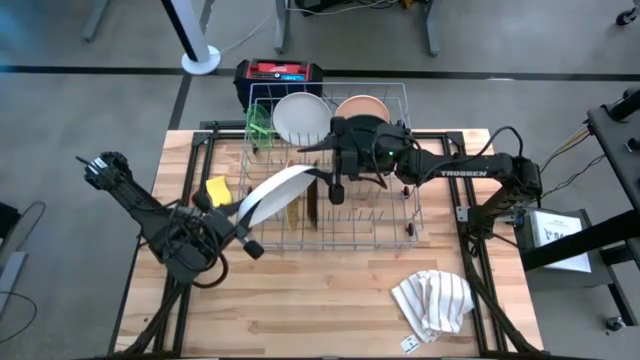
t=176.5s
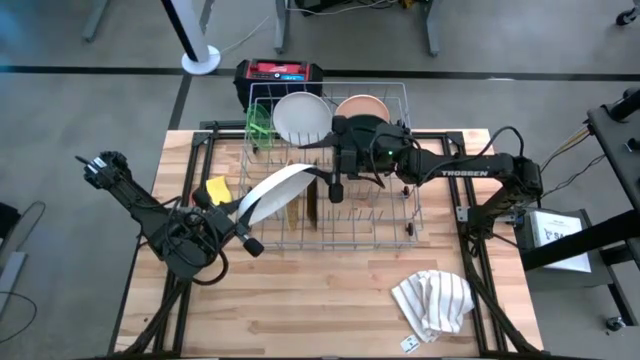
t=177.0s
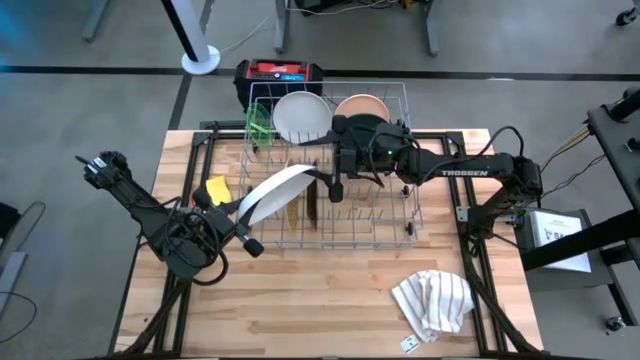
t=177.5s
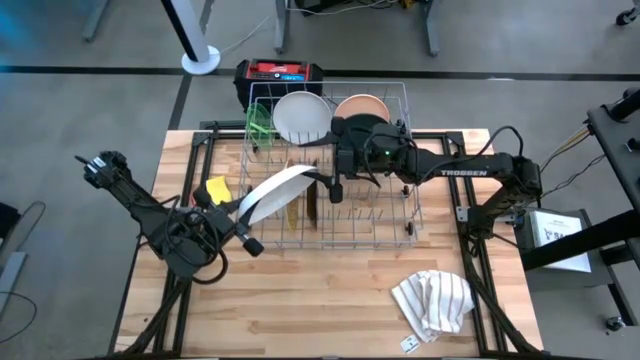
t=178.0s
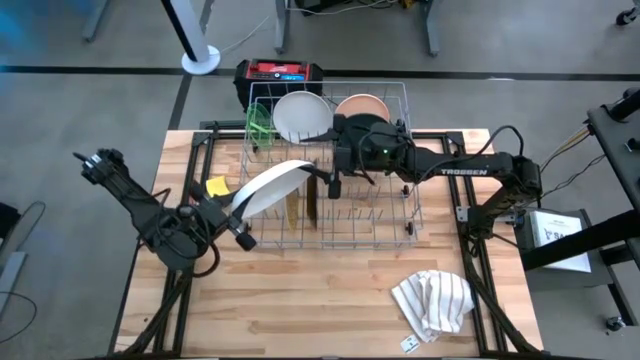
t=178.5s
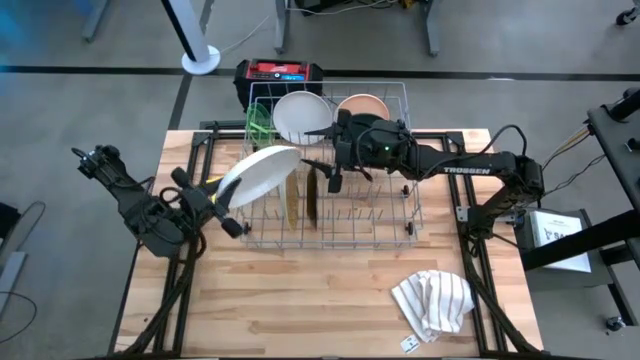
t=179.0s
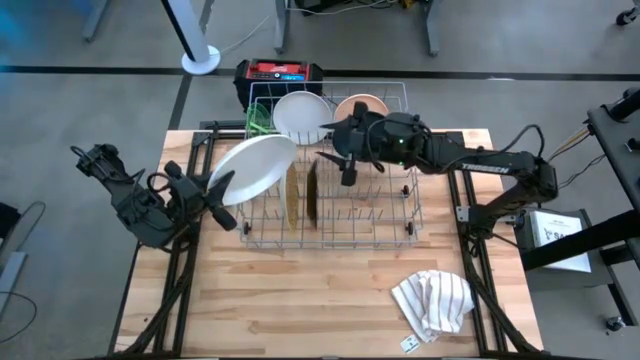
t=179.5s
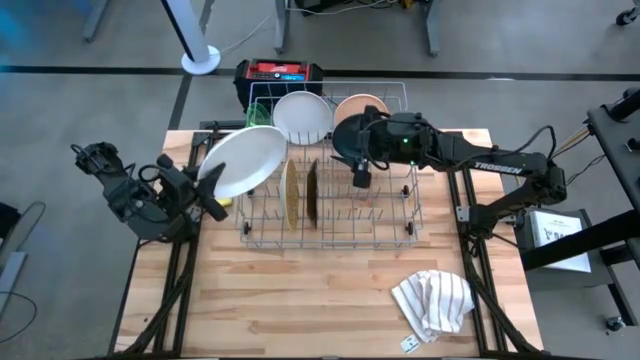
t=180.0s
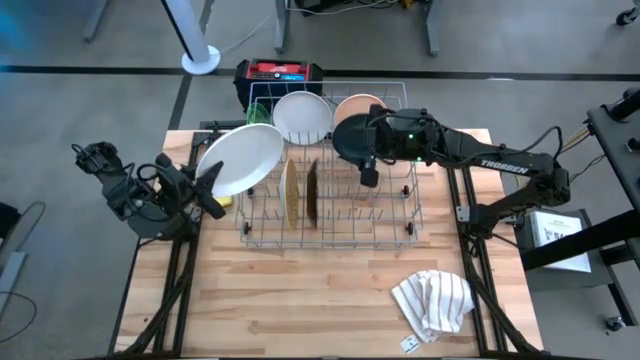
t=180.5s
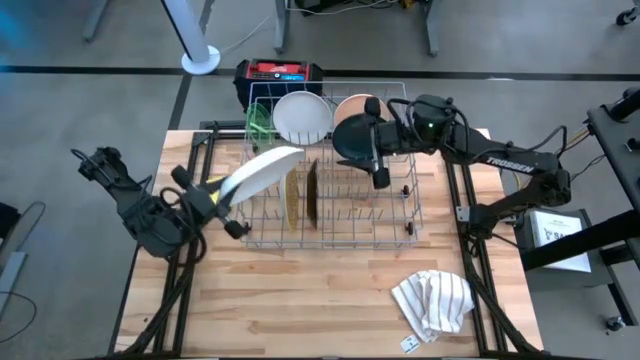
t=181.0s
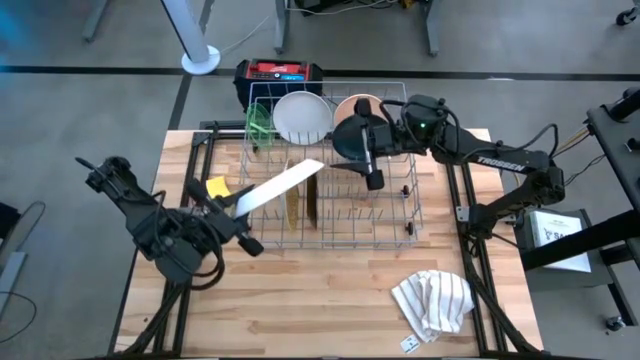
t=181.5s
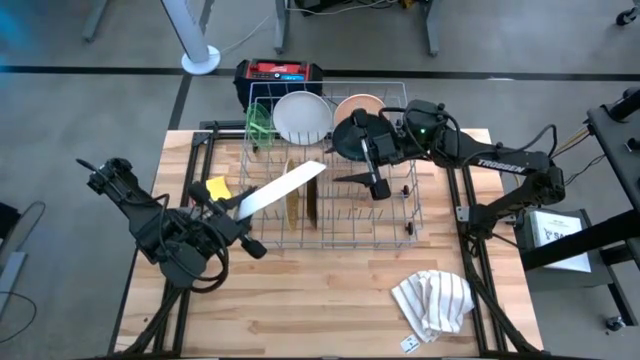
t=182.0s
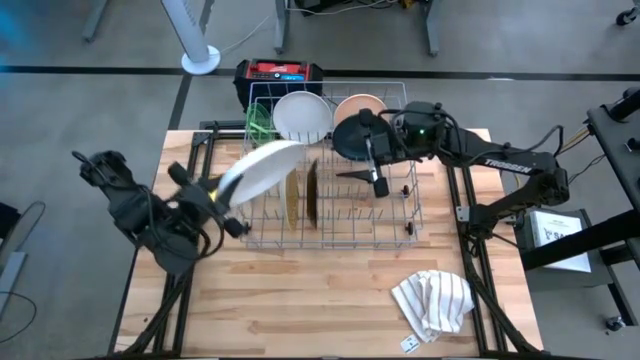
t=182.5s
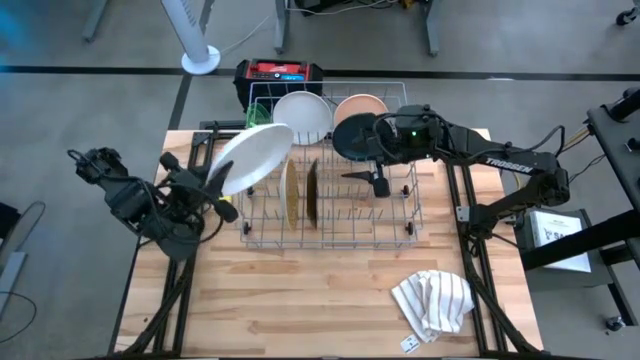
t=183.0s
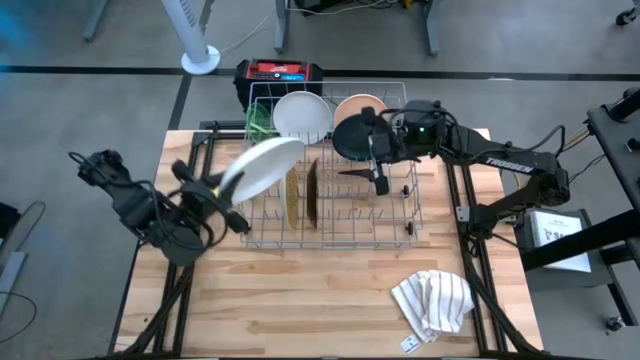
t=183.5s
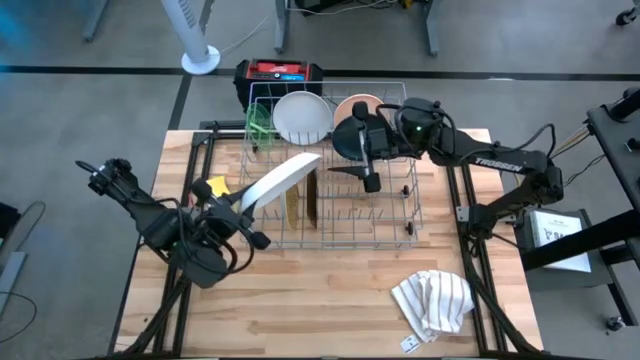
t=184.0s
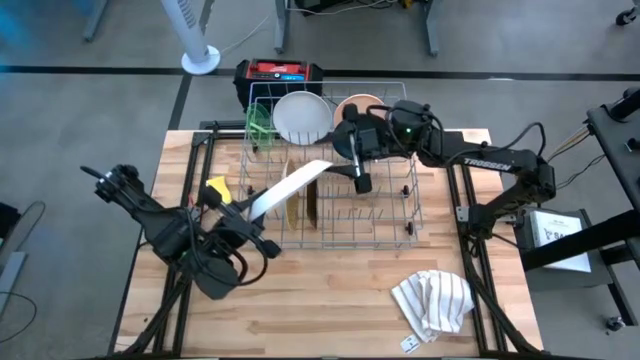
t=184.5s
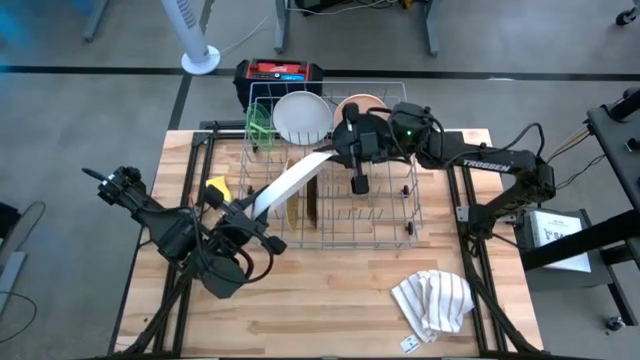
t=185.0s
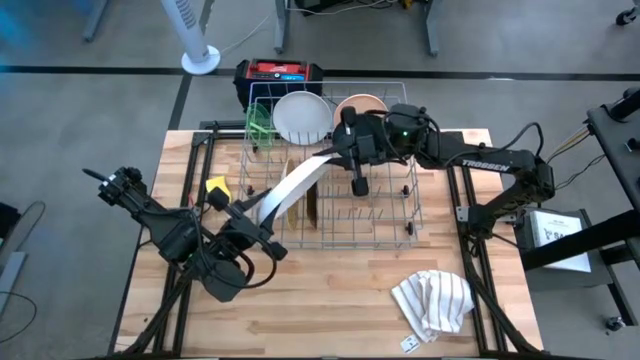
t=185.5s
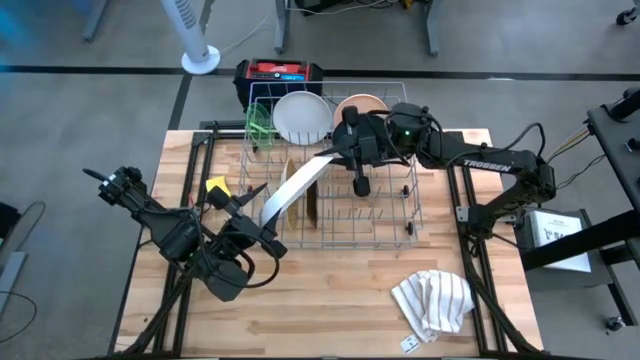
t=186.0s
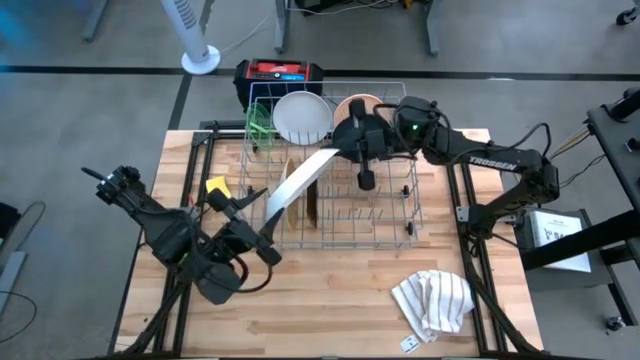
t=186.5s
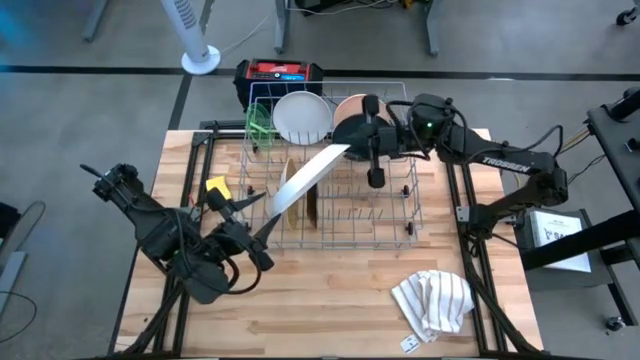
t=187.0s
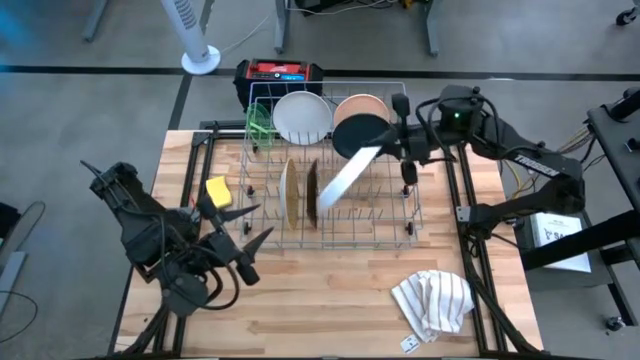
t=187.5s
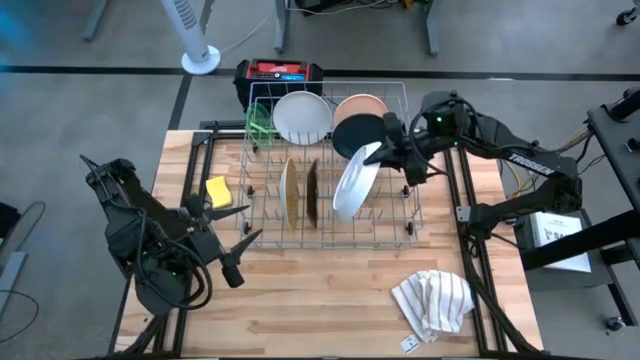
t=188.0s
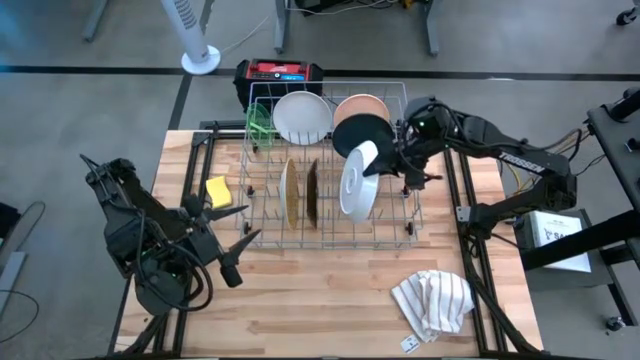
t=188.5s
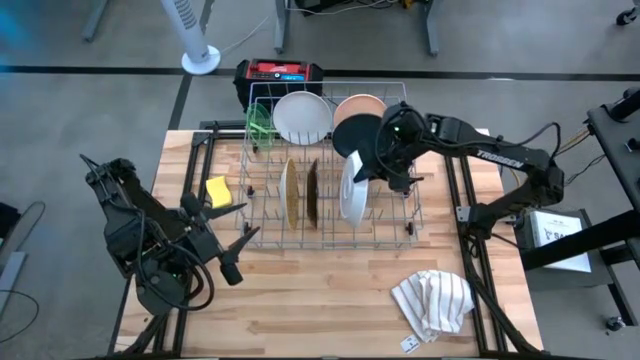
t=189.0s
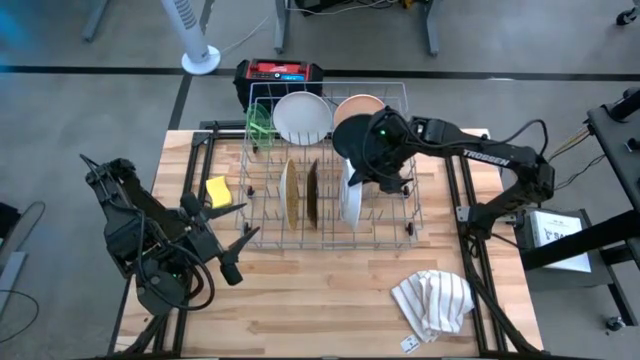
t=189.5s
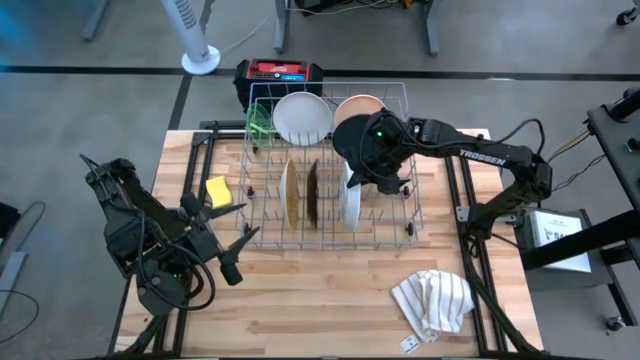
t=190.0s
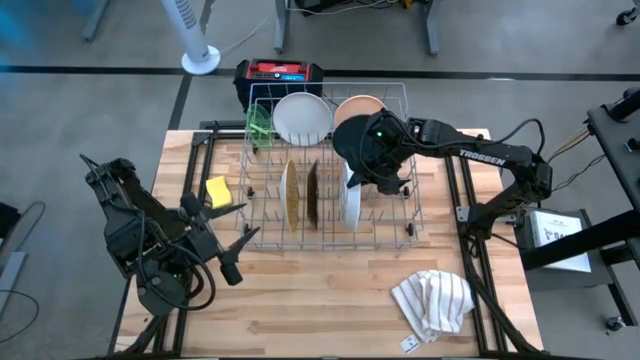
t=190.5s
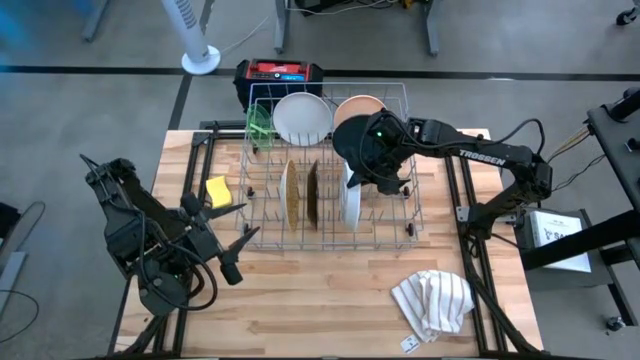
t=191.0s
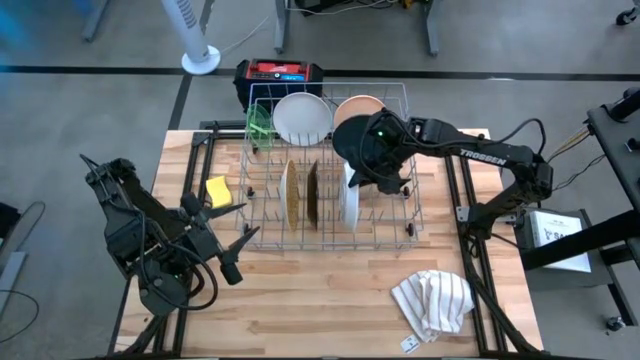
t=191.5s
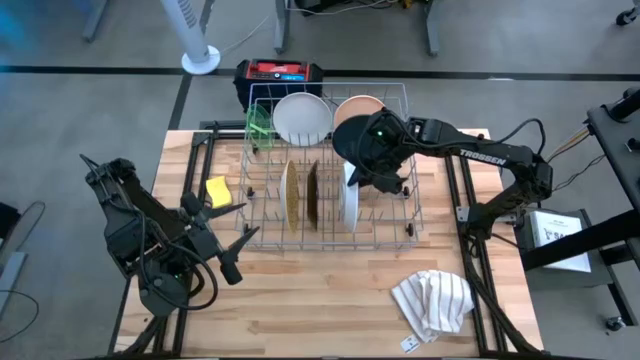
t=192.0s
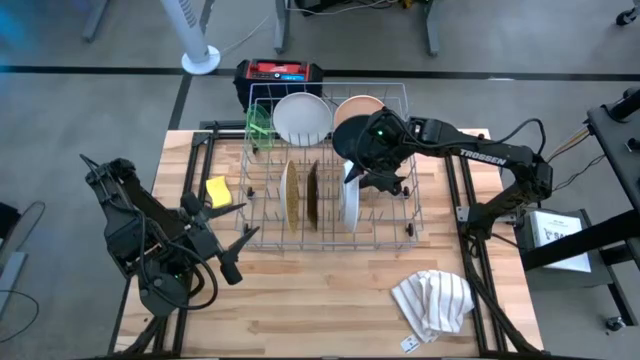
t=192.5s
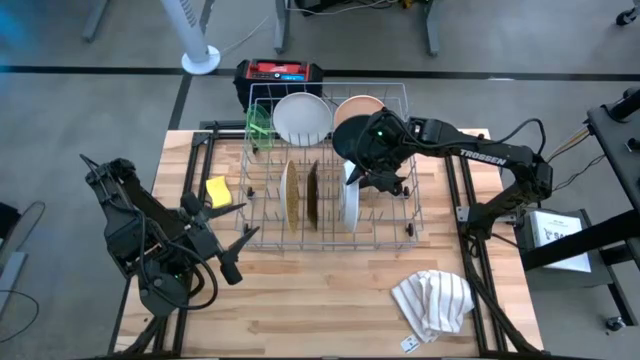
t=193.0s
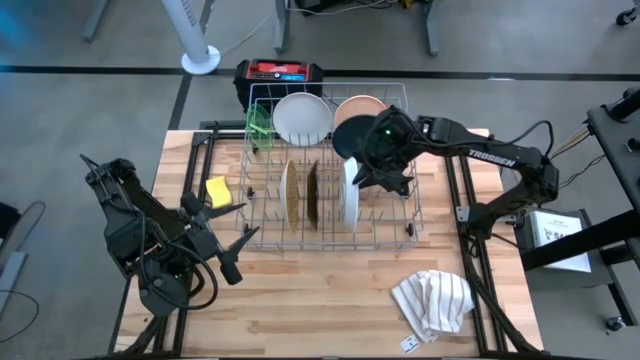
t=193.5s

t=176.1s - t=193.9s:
Task: Sort dishes
Put the white plate into the dish rack

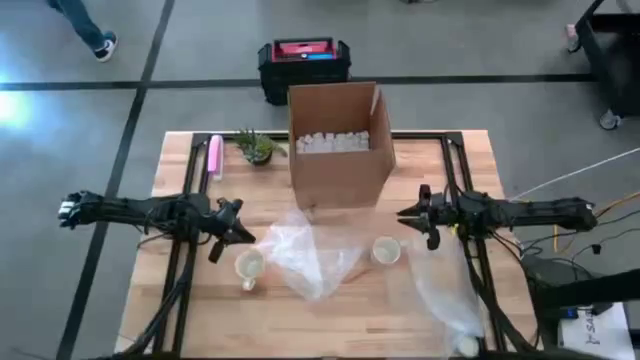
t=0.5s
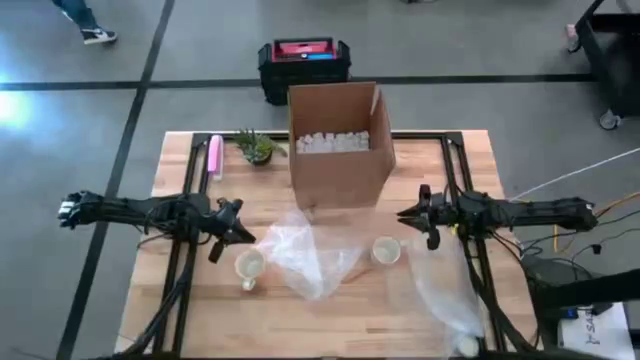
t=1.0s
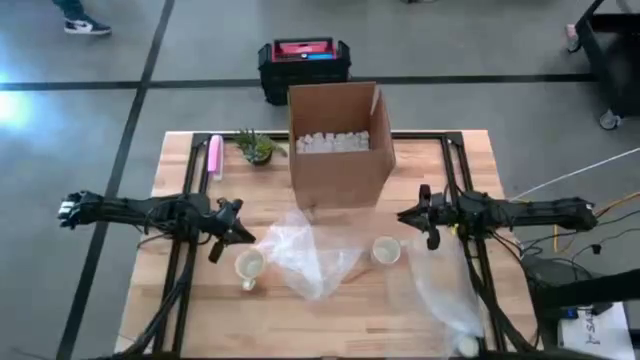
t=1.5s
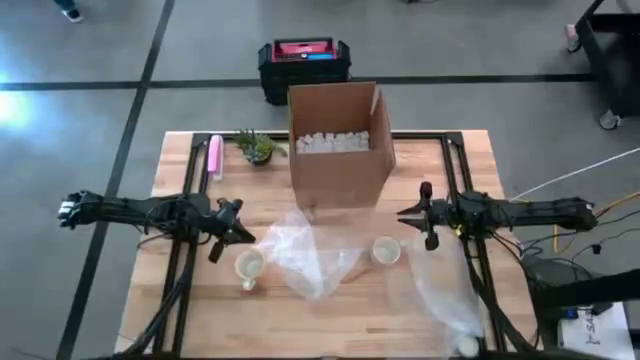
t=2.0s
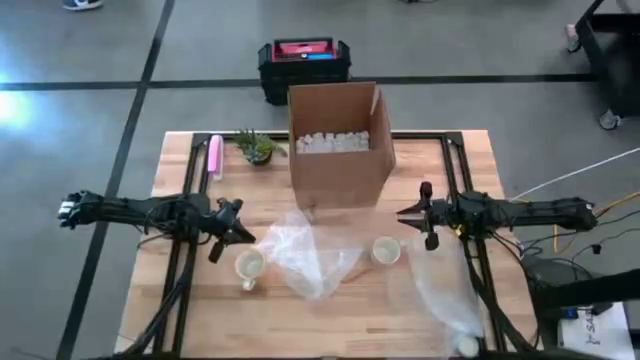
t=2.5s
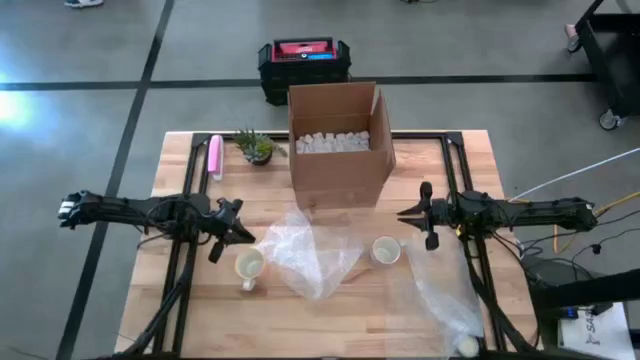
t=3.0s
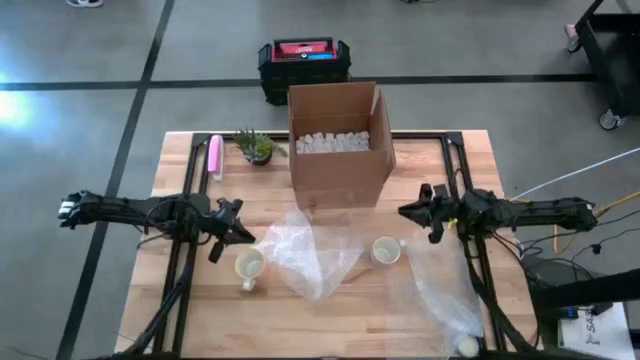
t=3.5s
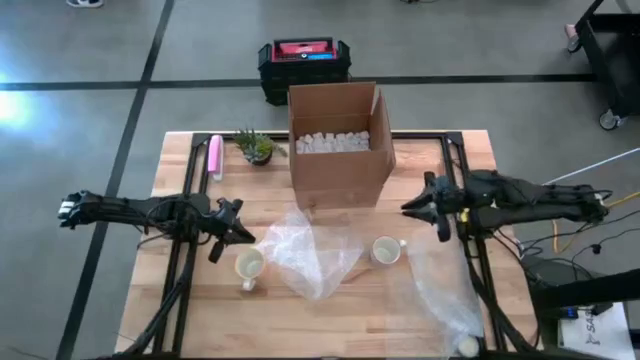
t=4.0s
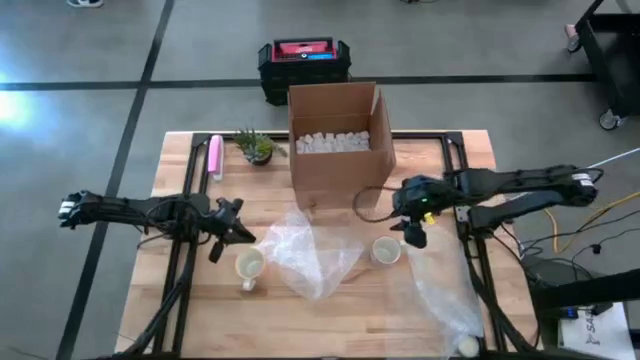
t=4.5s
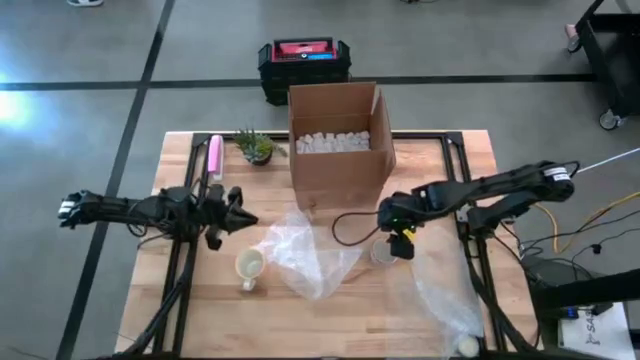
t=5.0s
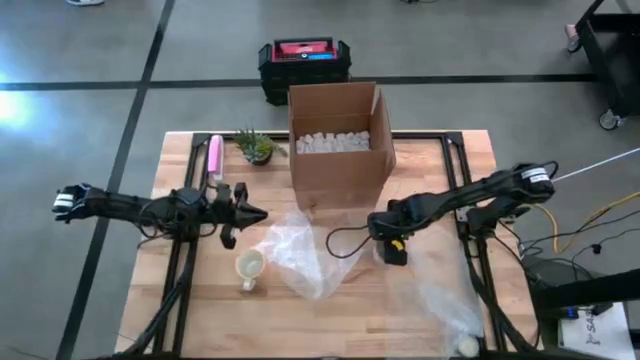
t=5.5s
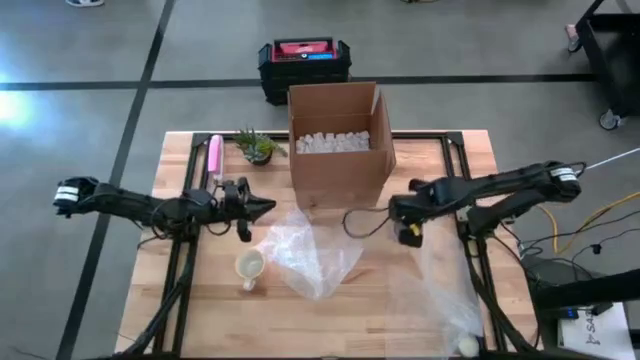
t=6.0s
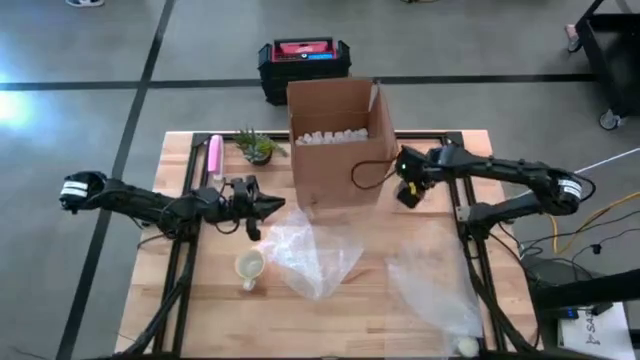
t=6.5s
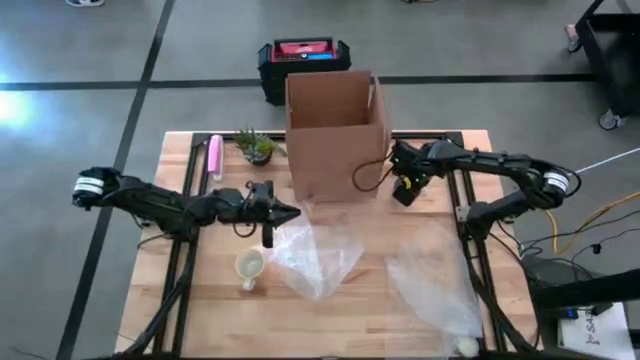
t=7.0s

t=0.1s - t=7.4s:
Task: wrap mug
Move the gray patterned mug to the top right of the table
